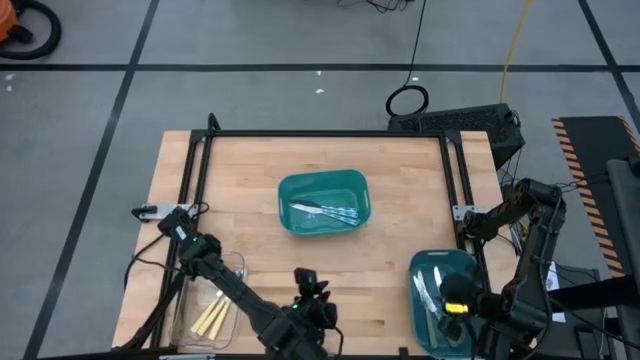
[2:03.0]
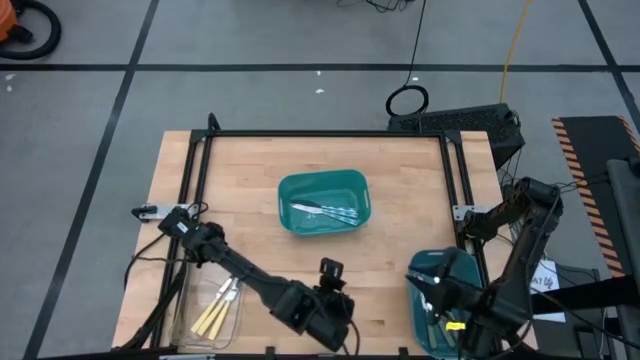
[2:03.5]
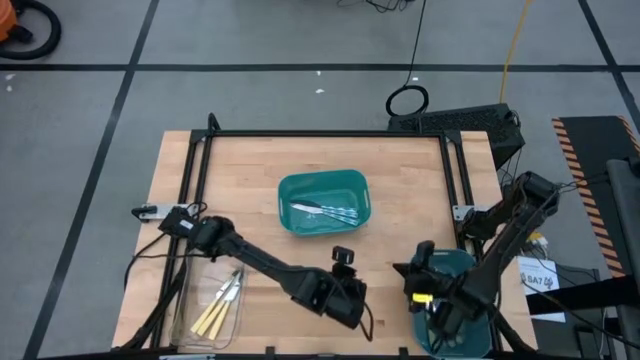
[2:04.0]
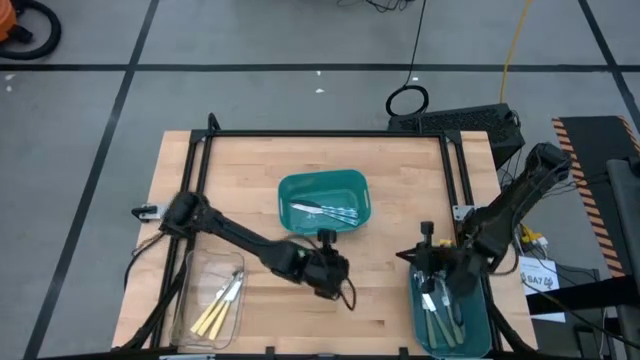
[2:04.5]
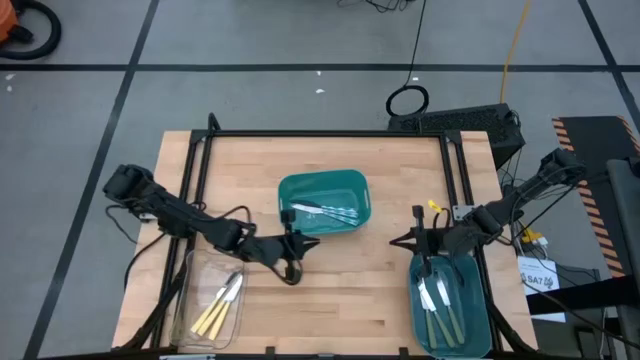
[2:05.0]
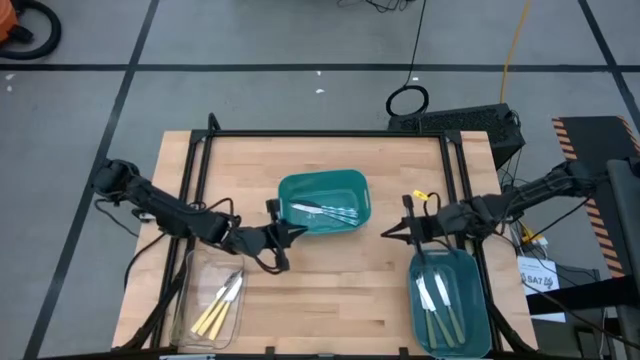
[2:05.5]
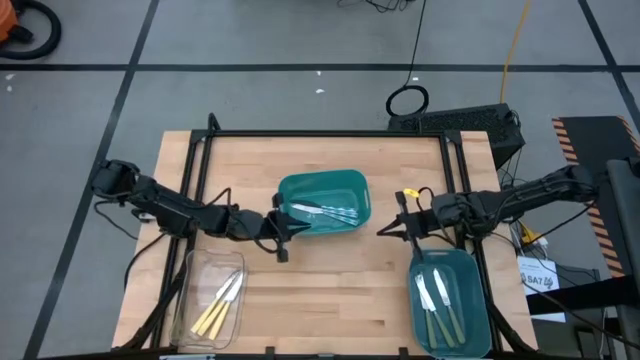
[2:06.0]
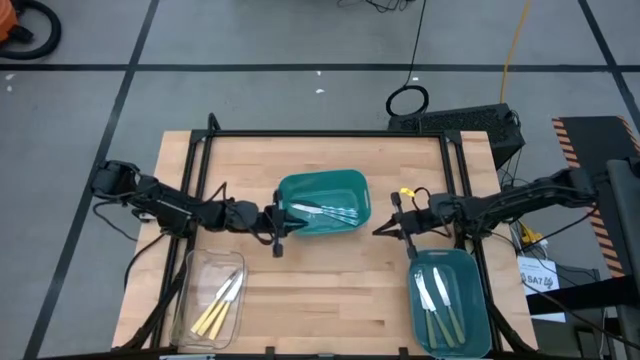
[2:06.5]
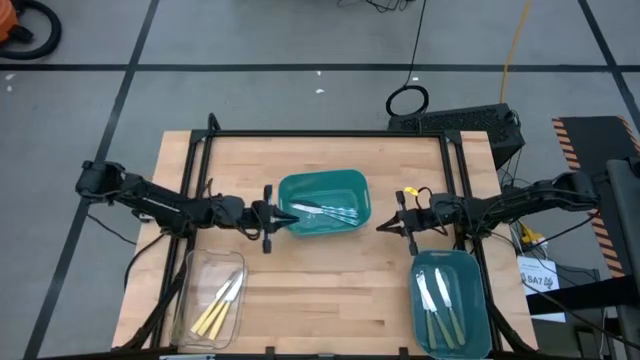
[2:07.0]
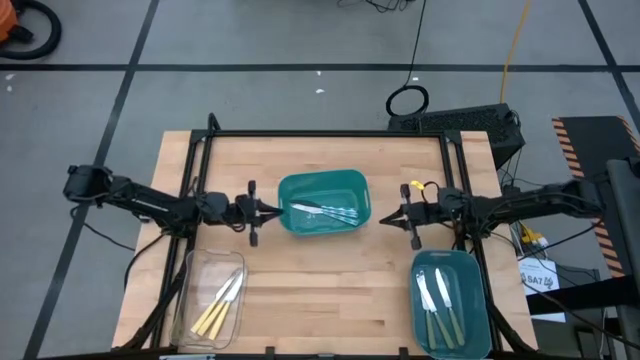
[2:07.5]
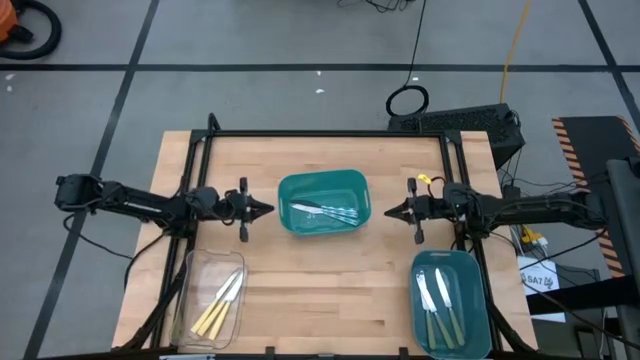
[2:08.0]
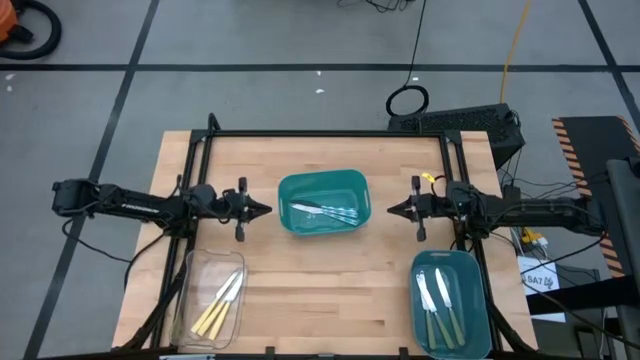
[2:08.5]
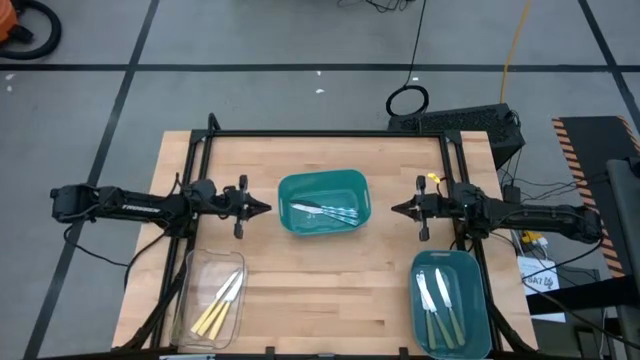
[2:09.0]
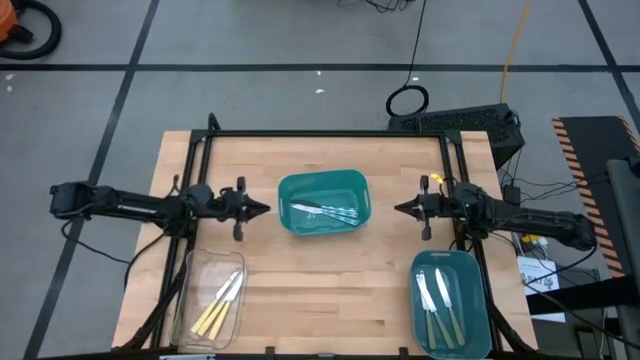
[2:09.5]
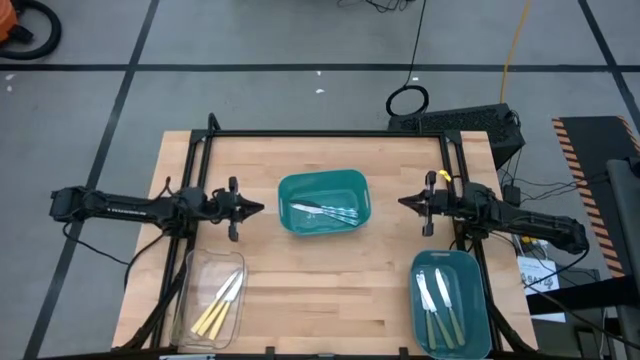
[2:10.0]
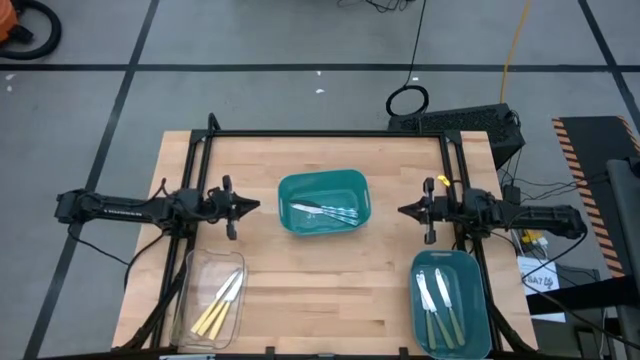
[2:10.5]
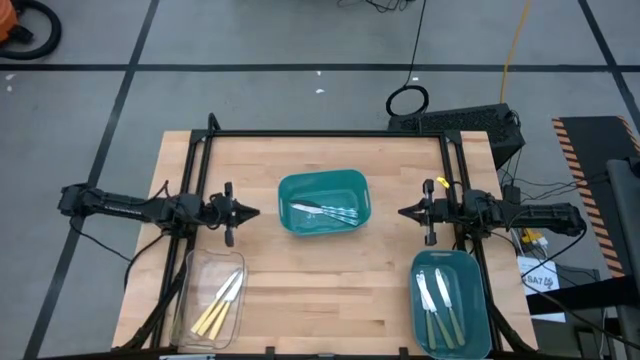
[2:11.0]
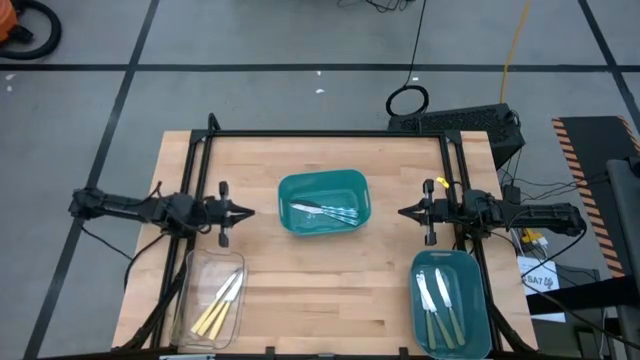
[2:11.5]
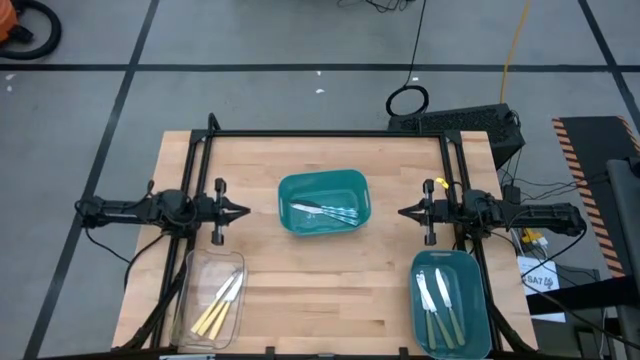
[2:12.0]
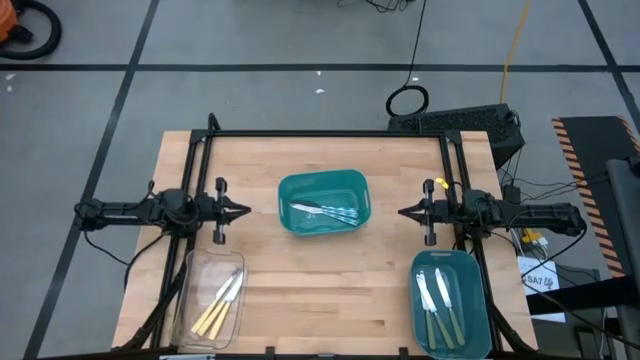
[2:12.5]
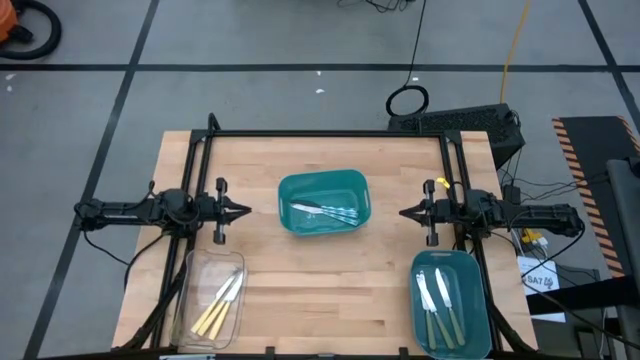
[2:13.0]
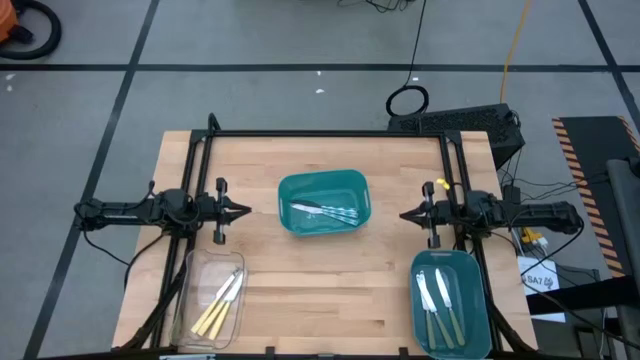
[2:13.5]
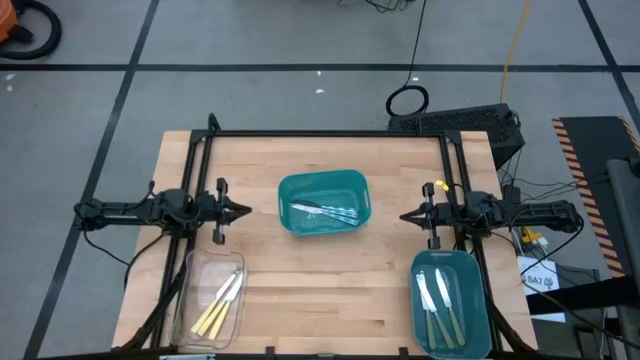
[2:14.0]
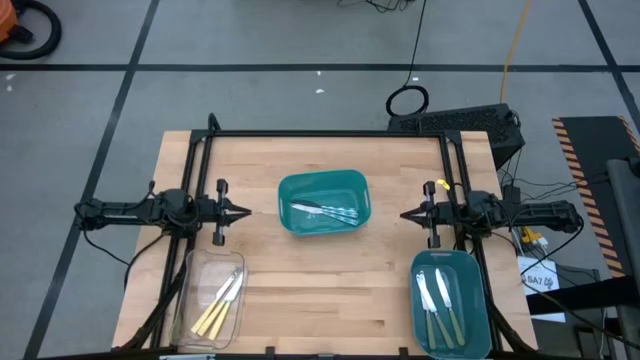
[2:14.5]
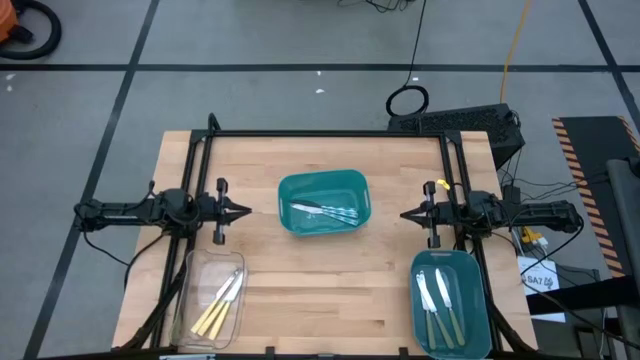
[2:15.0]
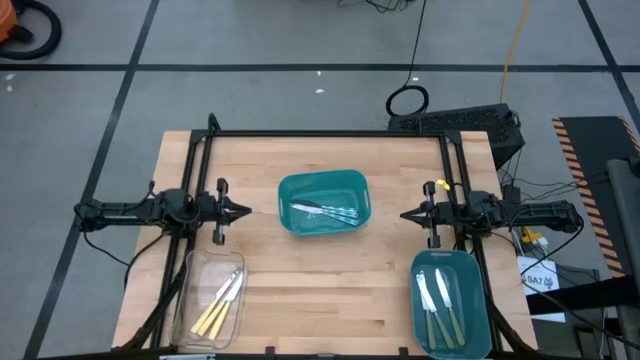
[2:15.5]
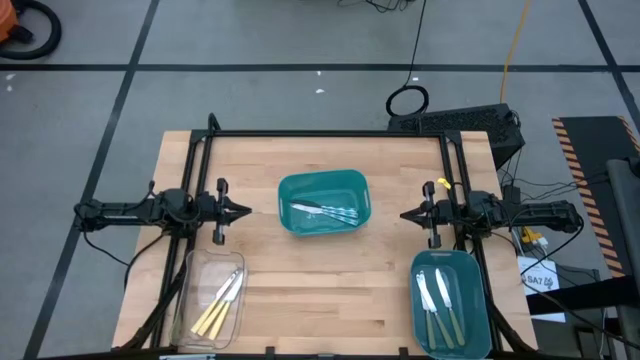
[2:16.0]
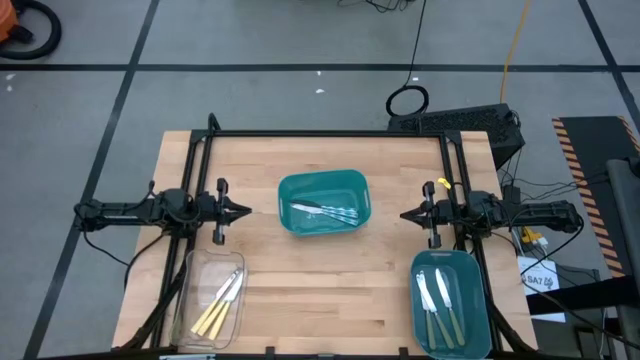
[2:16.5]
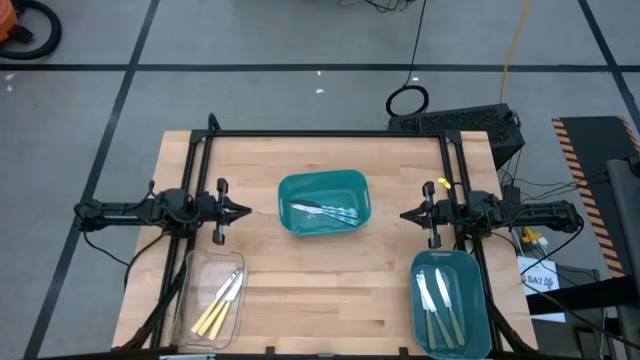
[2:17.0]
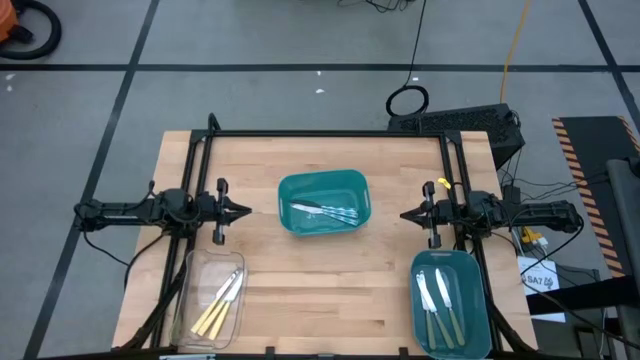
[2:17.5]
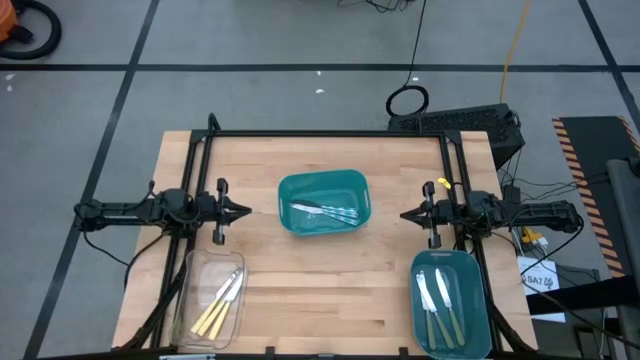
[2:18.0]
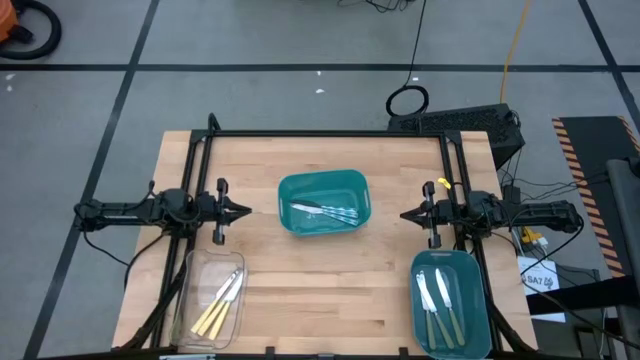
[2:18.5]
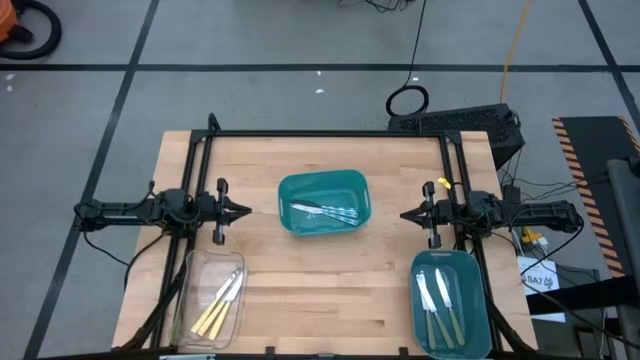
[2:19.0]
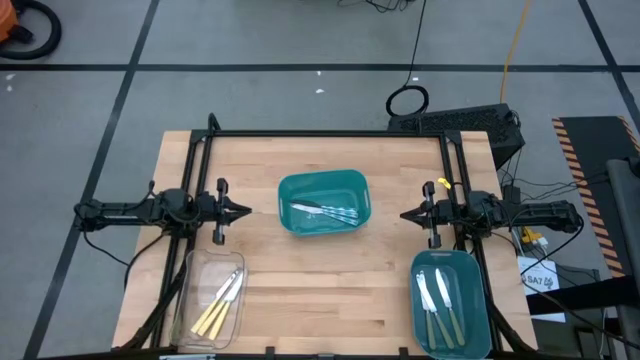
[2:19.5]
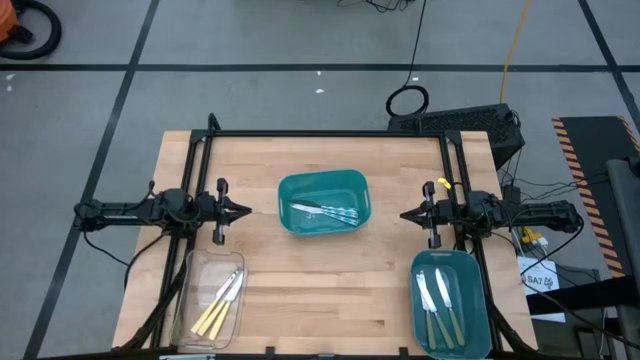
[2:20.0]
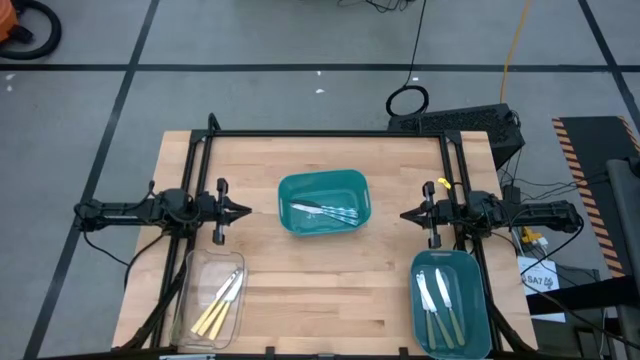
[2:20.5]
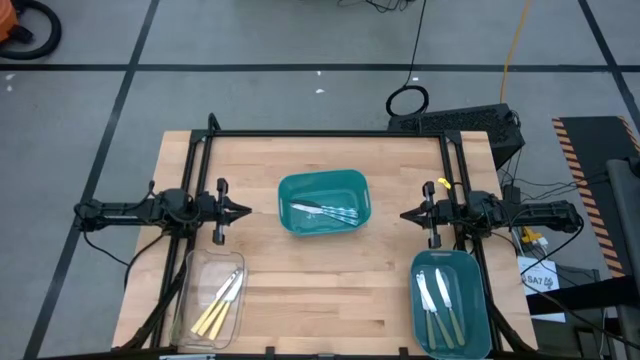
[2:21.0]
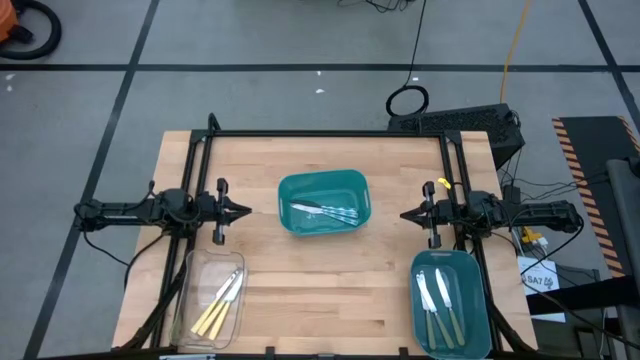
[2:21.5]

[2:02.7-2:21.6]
Task: Sort silverware by color (type)
Return to Home Position

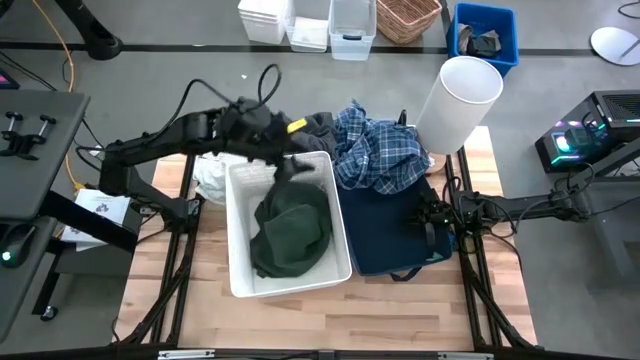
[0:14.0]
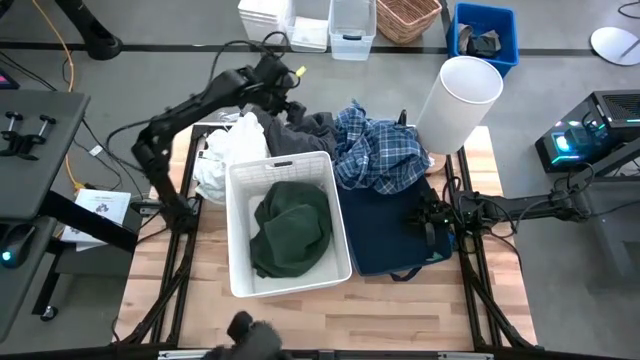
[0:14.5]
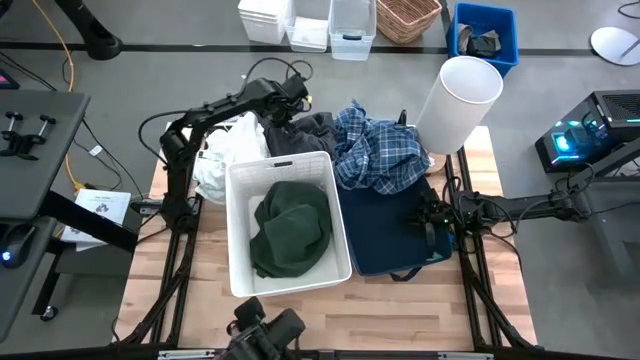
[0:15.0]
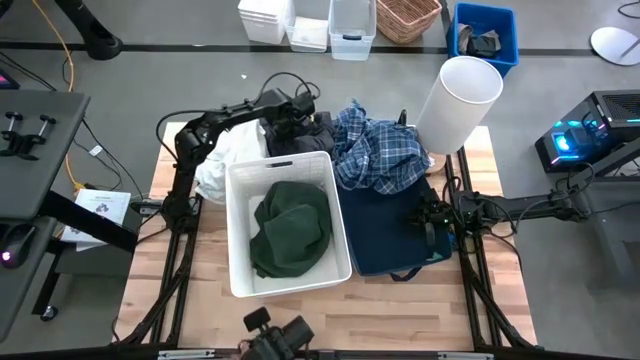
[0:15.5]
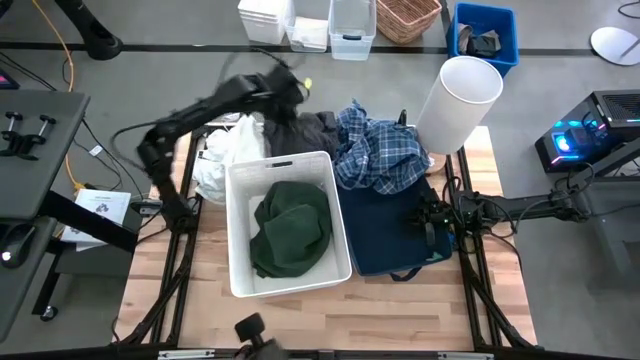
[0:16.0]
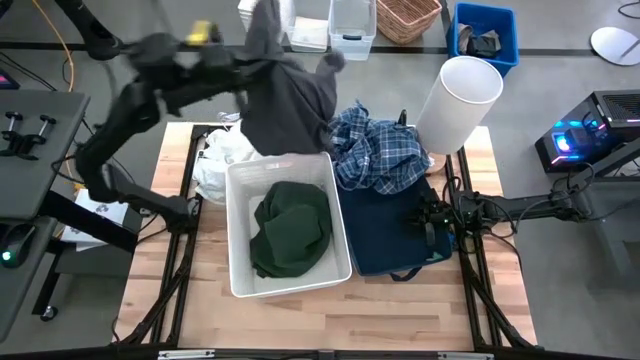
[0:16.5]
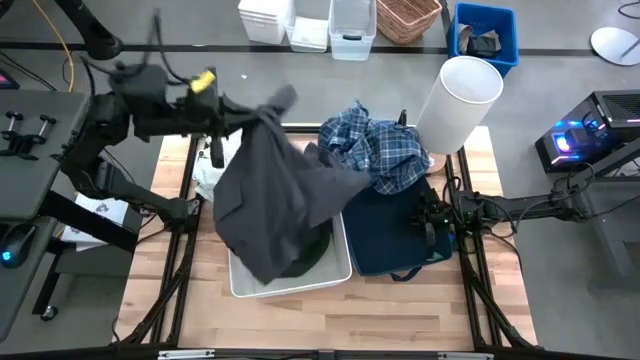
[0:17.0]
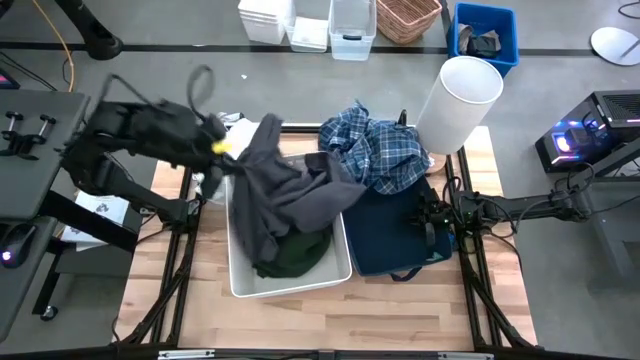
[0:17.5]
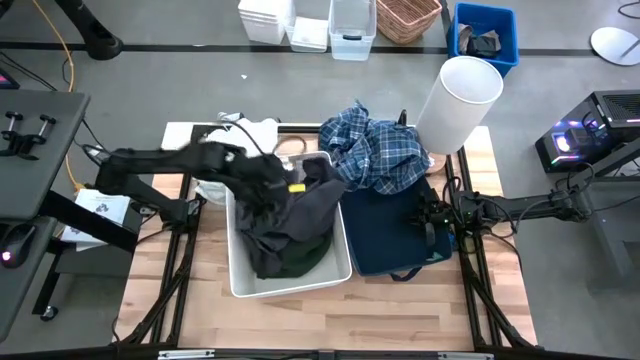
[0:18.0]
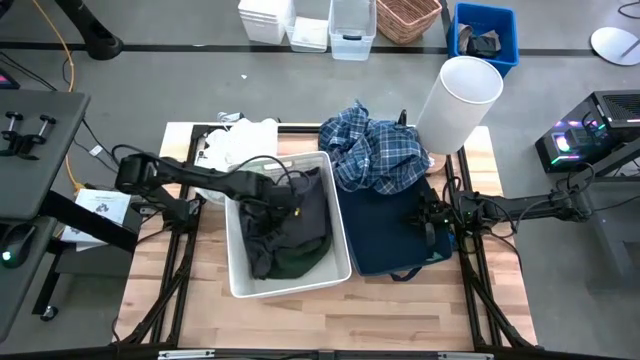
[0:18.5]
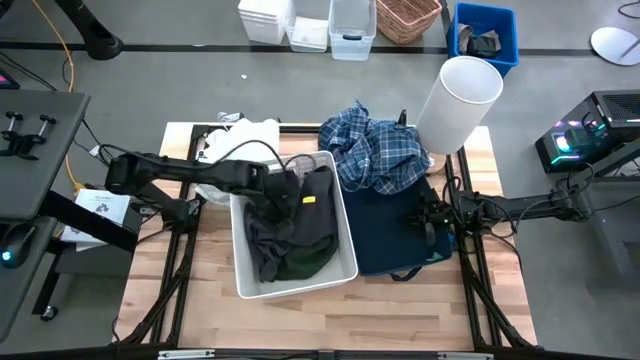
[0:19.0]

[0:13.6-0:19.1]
Task: Sort clothes
Put the gray blazer into the white laundry bin
